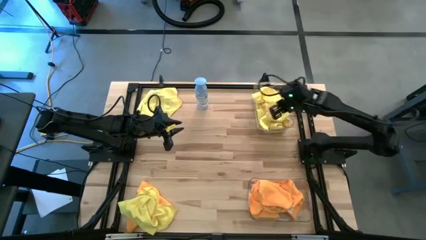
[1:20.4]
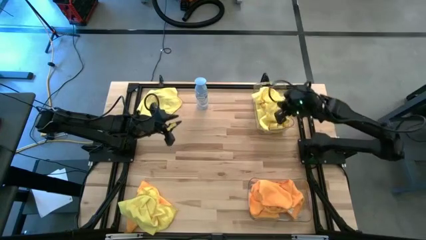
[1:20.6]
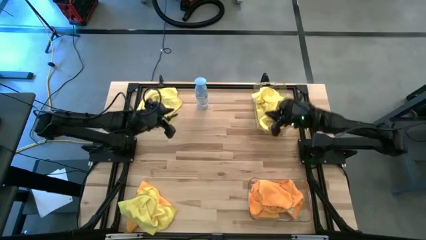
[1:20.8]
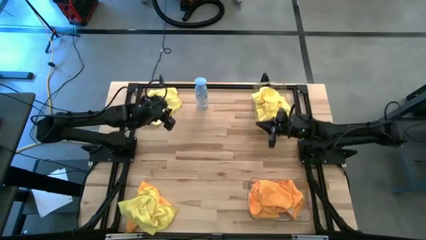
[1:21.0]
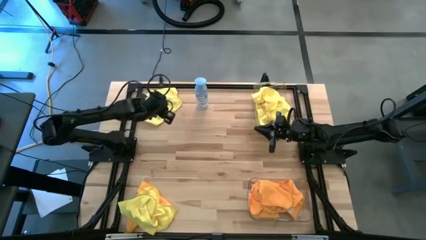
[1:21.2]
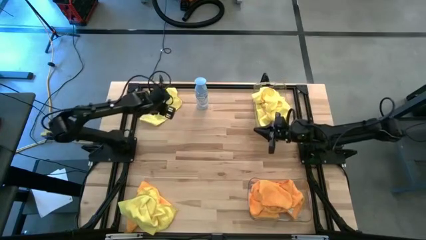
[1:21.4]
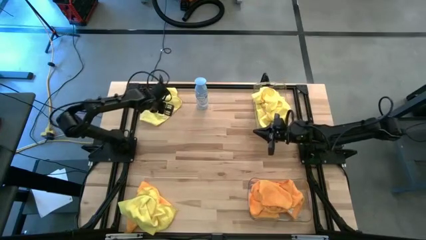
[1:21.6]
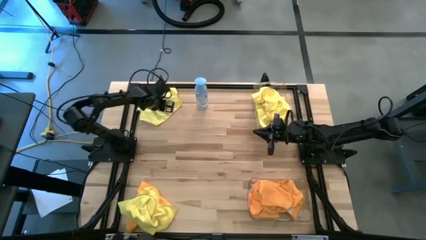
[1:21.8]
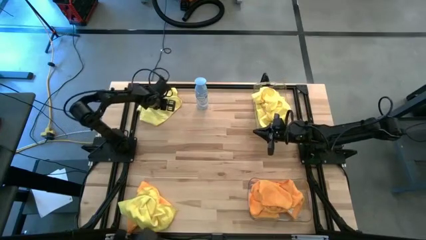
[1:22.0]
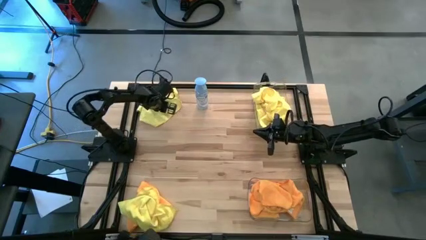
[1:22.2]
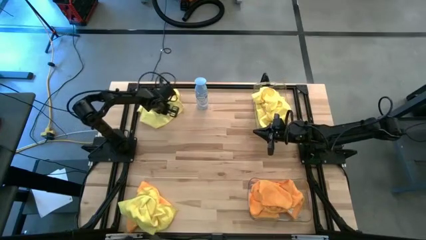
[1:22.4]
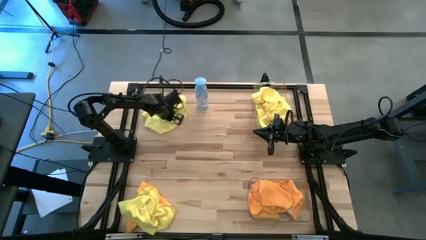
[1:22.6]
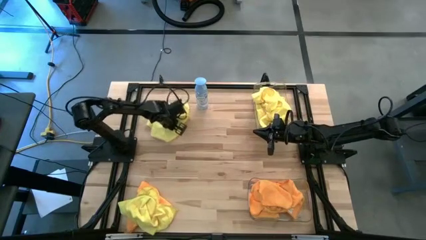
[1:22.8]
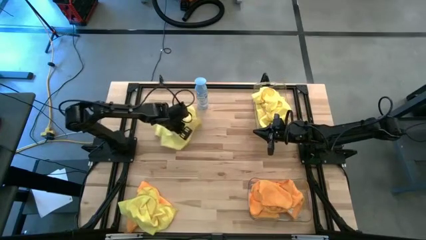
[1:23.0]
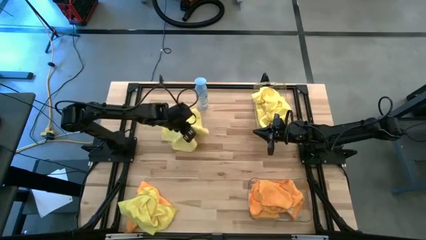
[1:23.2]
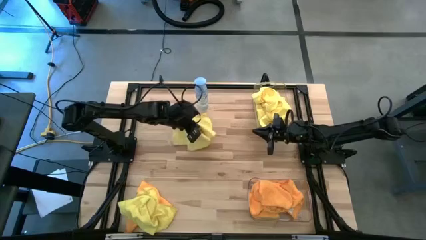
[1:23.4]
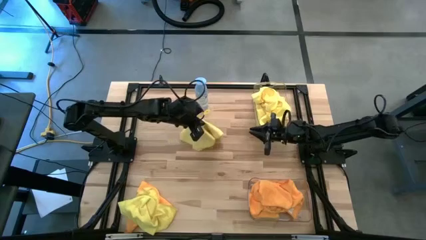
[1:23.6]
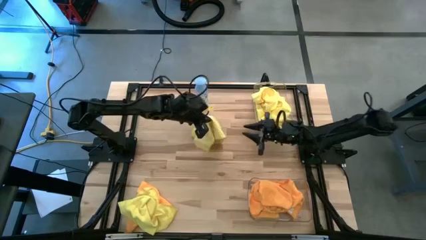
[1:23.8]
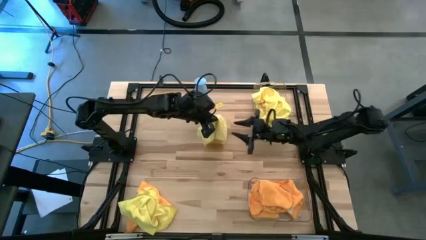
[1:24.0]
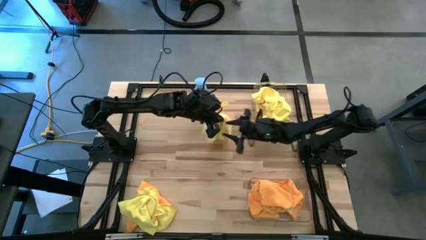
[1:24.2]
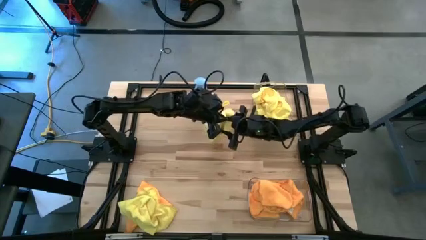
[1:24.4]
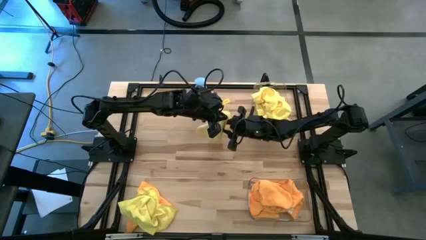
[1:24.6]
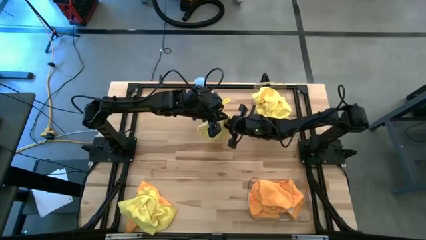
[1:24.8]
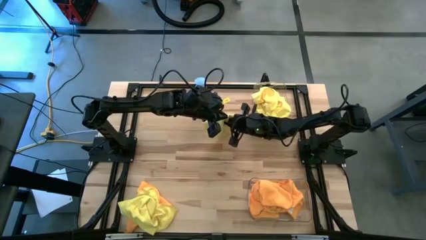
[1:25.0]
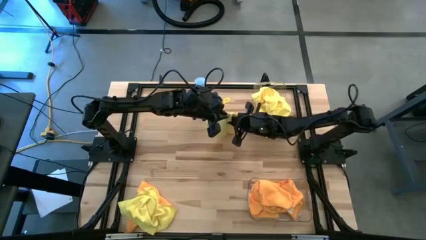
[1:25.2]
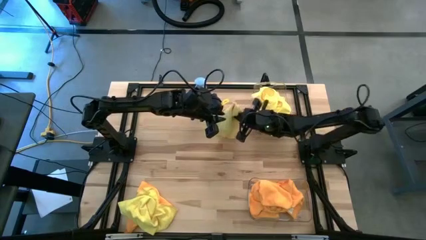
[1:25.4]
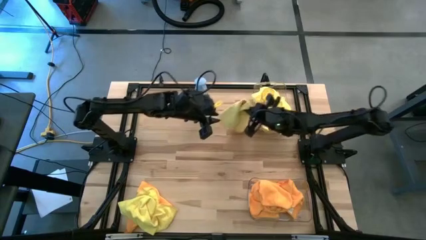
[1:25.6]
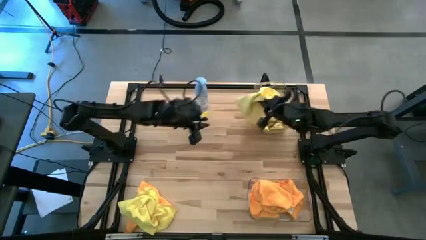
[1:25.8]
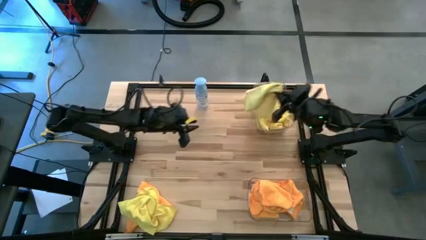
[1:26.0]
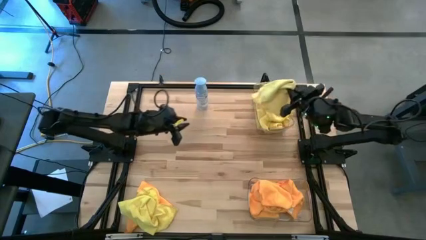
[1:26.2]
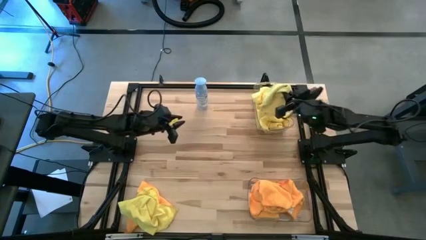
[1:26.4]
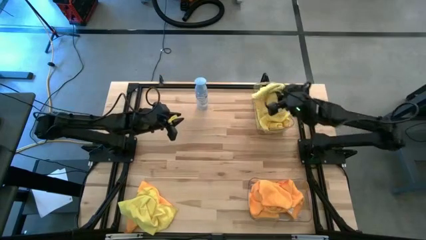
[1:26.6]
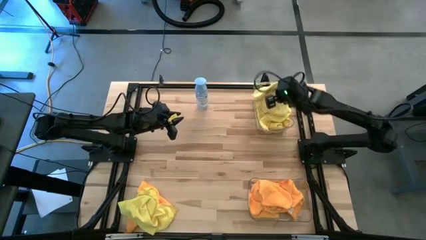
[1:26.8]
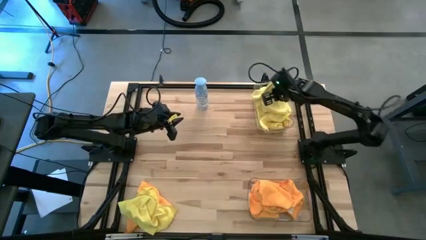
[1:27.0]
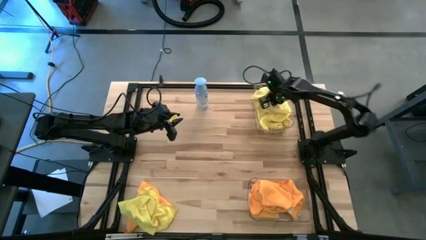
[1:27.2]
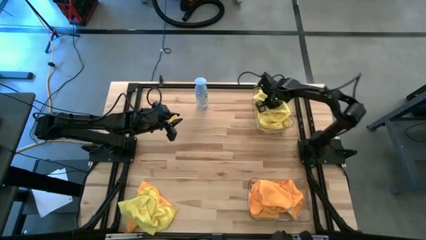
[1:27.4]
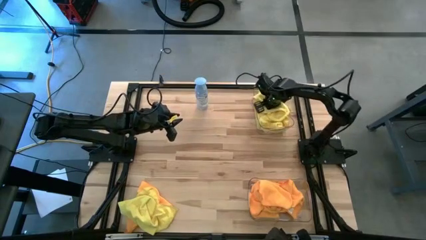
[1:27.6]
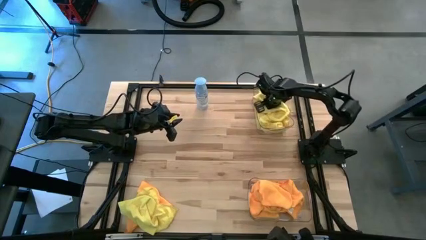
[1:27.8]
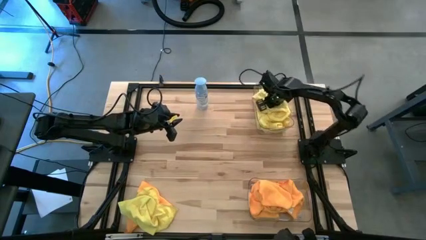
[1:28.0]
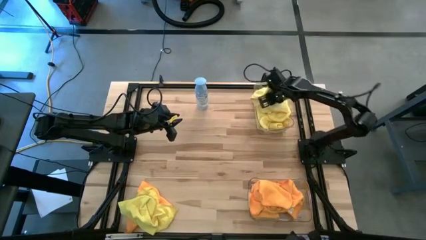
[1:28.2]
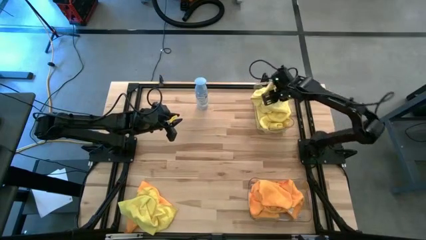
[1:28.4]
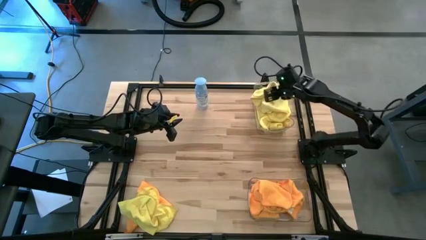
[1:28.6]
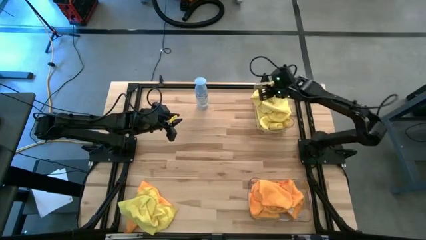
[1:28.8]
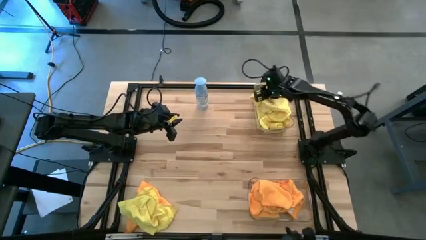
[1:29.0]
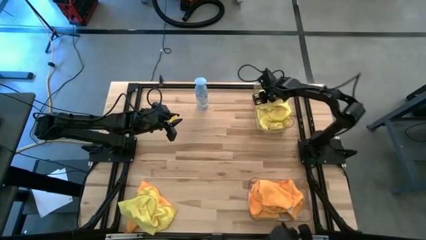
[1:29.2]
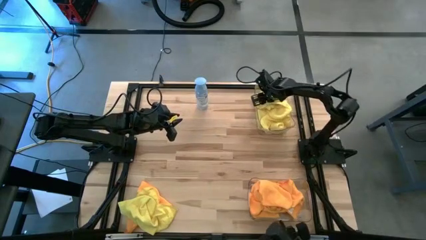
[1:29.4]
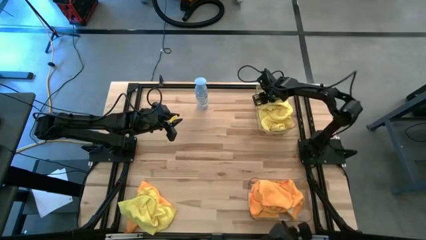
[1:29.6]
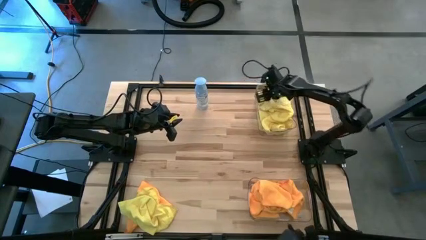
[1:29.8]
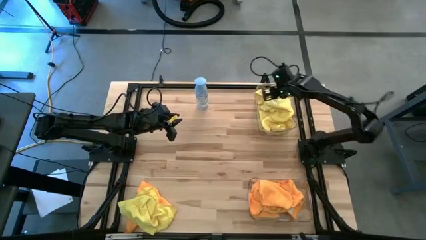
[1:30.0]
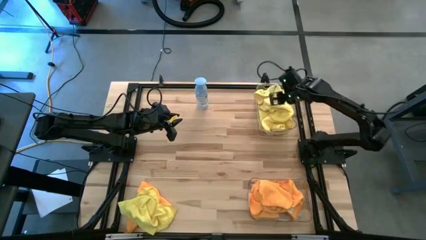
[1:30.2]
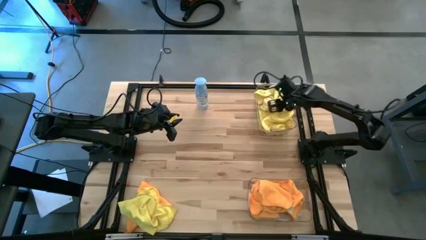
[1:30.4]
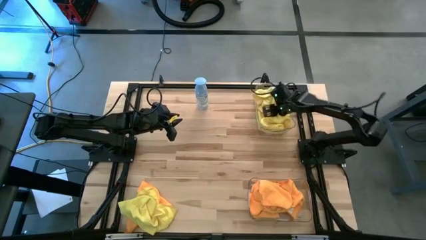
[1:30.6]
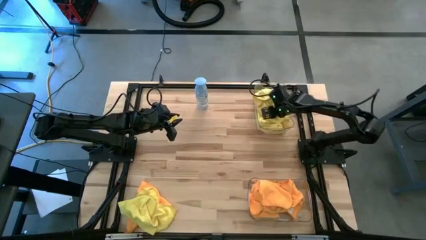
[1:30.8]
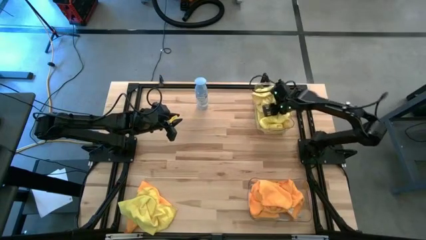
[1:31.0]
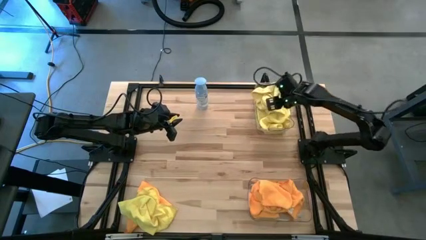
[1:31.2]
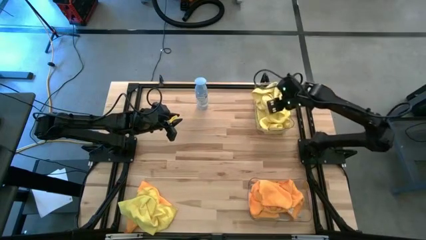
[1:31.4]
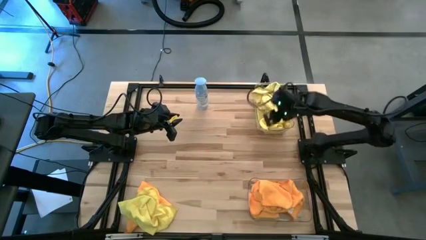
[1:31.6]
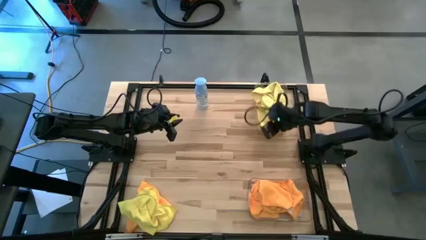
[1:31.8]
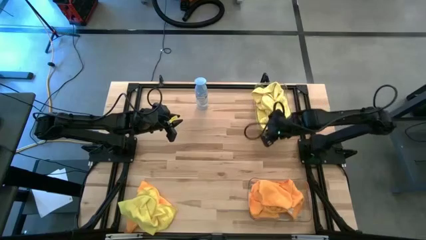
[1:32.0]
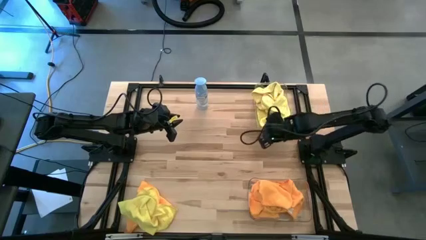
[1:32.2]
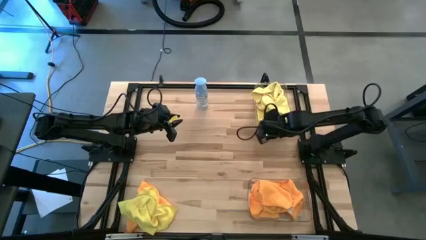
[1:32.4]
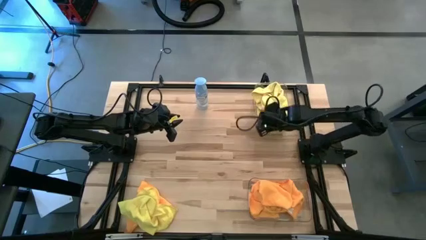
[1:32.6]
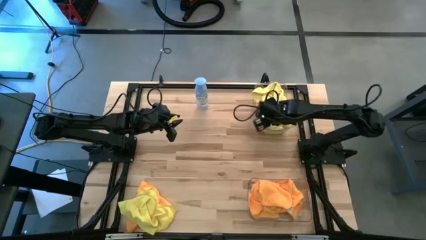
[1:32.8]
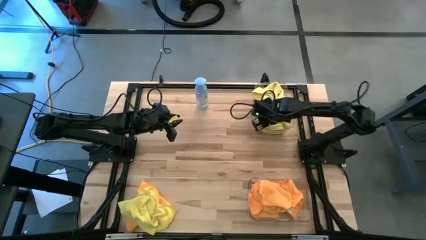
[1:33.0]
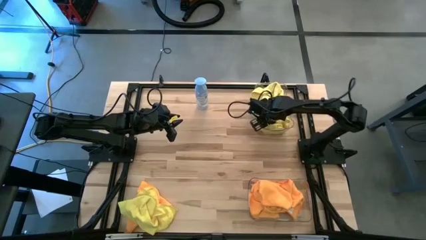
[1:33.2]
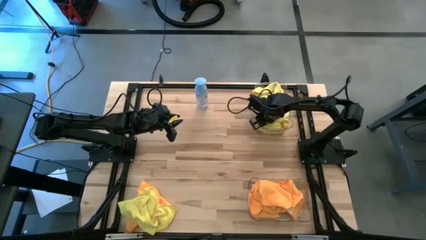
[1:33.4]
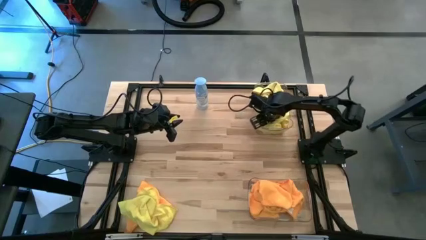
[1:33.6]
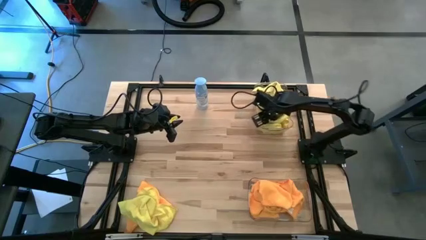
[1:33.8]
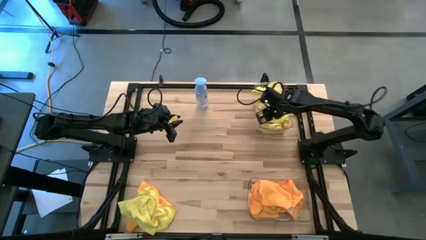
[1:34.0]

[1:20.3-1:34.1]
Task: Sort microfiber towel by color & place in baskets
Put the yellow microfiber cloth into the top transparent bin

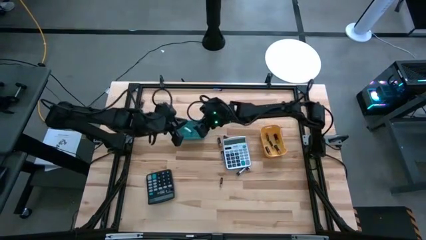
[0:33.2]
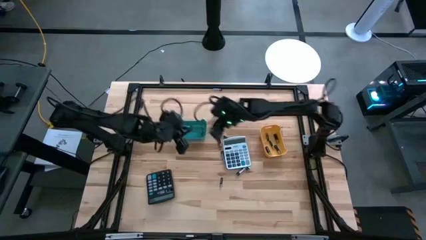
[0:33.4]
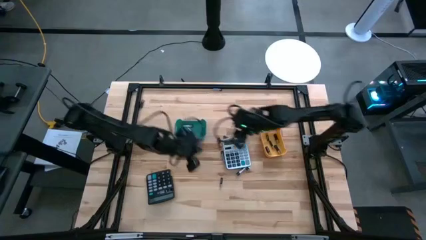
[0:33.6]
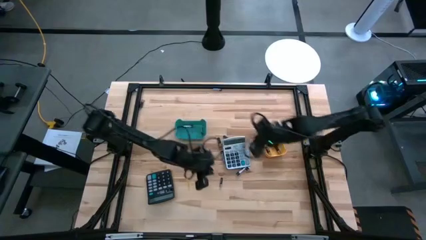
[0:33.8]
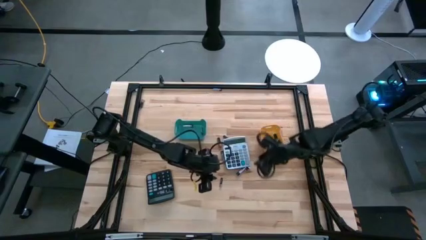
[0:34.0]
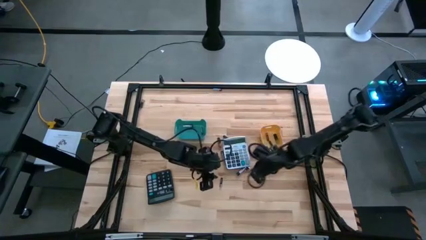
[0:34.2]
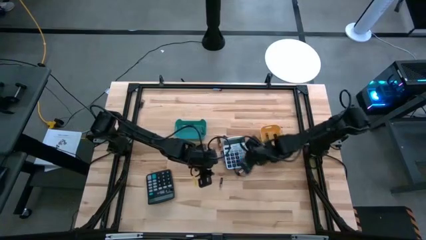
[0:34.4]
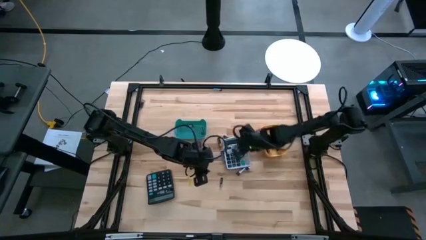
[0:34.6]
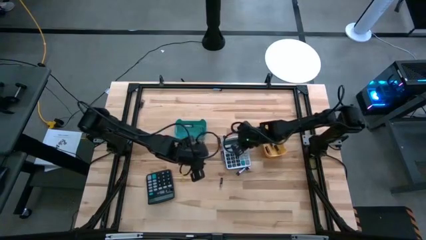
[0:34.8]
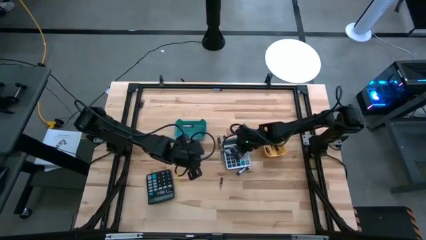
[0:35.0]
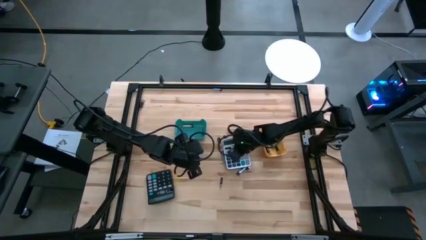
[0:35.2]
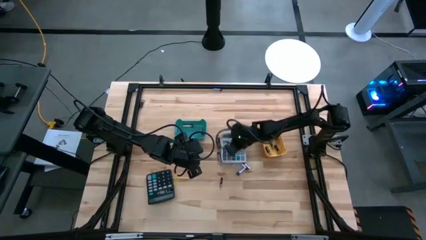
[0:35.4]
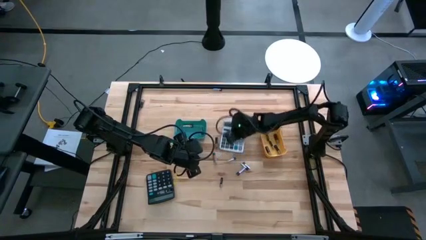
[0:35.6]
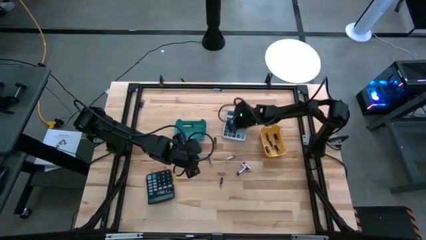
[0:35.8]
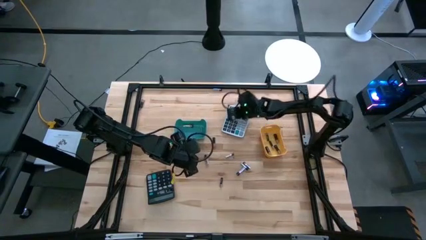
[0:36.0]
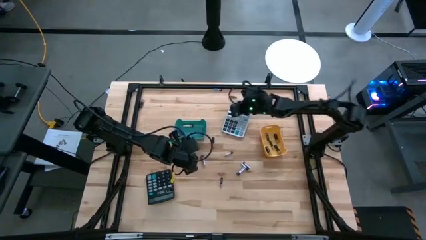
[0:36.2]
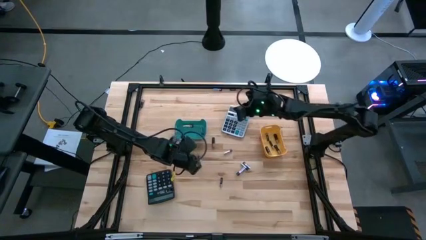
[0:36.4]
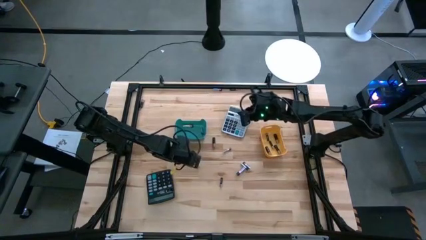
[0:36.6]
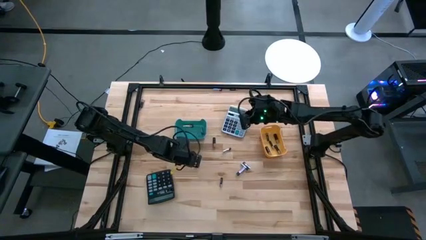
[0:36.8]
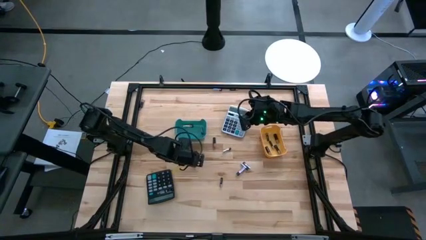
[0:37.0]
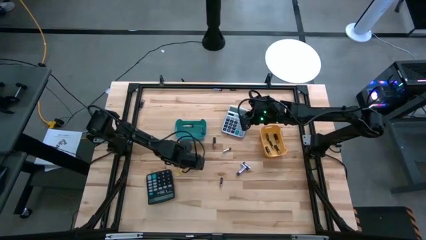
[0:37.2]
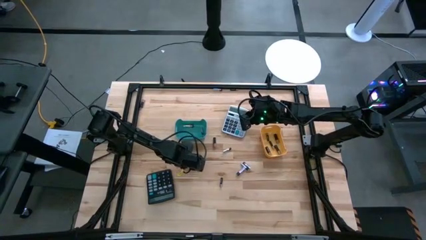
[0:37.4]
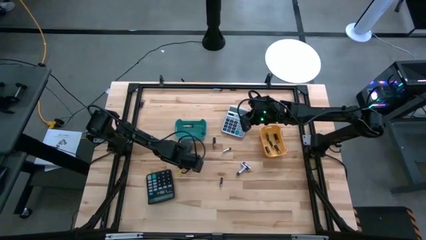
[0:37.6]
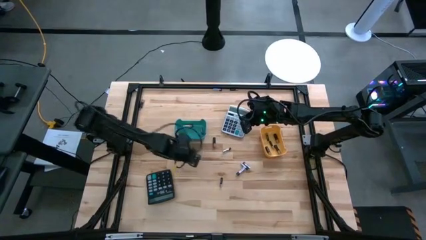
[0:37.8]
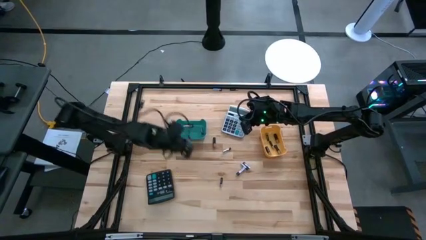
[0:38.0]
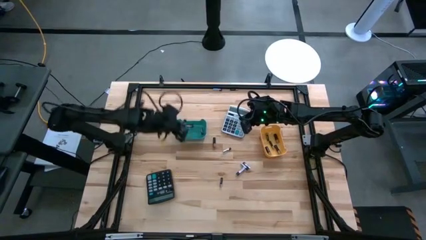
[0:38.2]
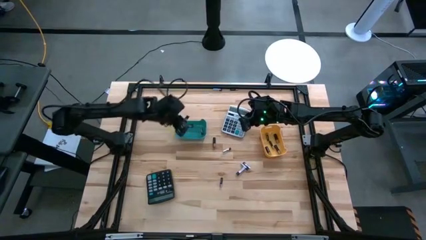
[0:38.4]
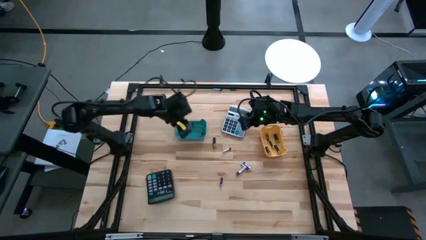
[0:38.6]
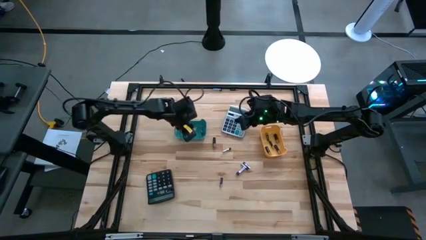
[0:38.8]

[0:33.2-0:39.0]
Task: Sort batteries
Put the silver battery into the blue bin
